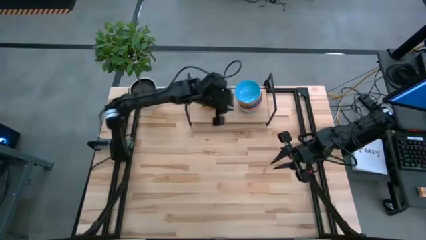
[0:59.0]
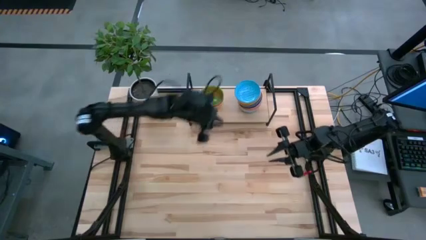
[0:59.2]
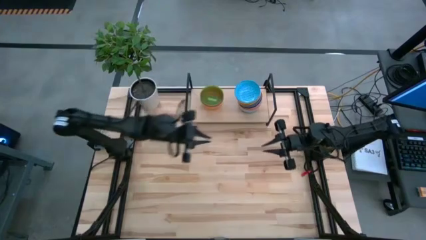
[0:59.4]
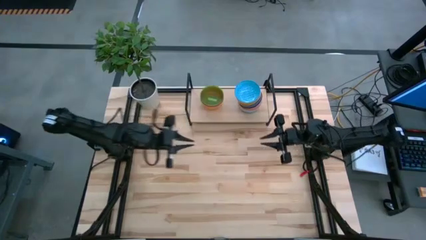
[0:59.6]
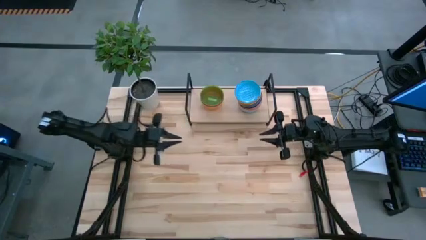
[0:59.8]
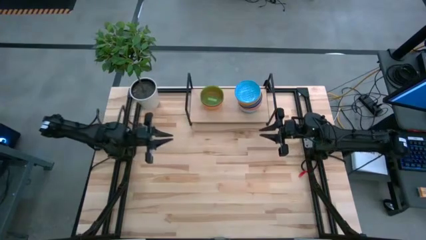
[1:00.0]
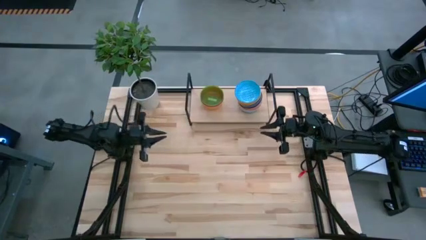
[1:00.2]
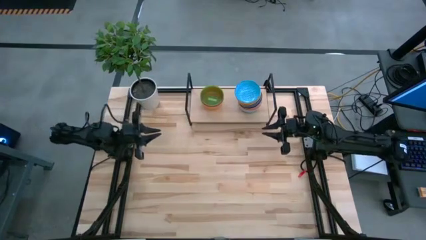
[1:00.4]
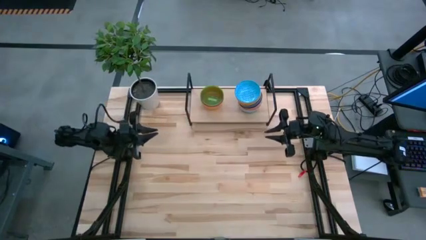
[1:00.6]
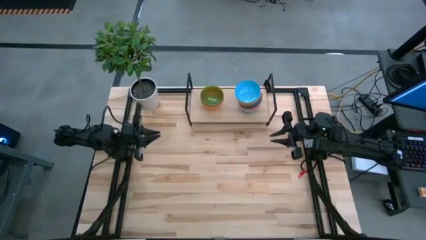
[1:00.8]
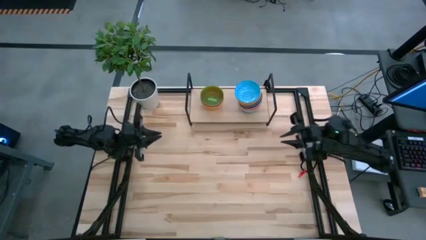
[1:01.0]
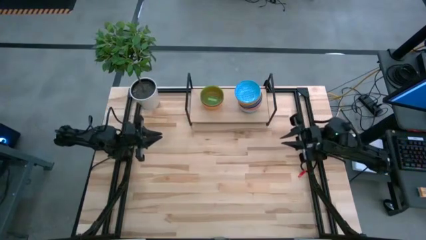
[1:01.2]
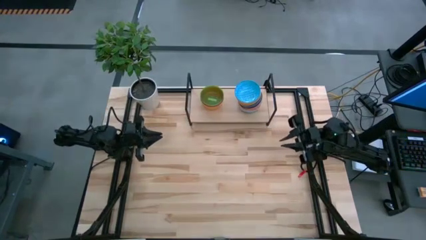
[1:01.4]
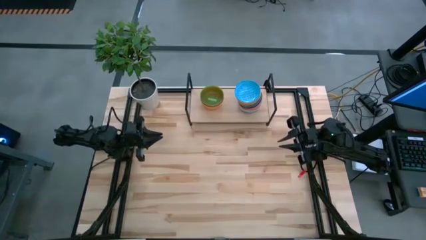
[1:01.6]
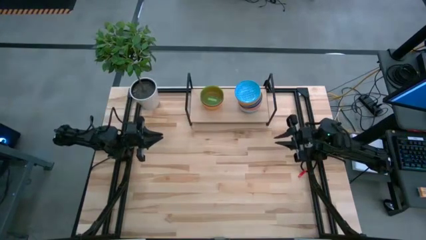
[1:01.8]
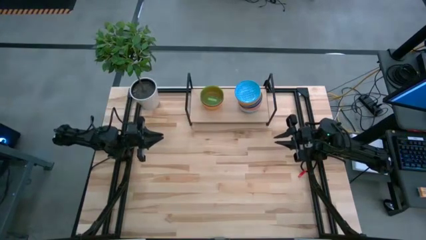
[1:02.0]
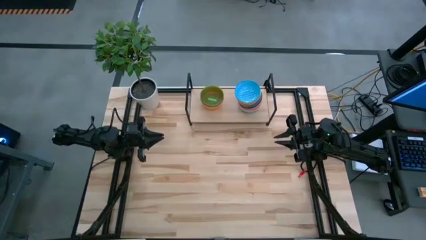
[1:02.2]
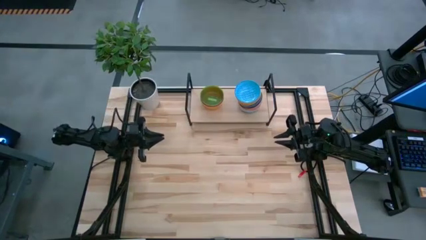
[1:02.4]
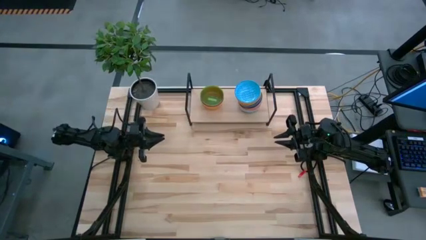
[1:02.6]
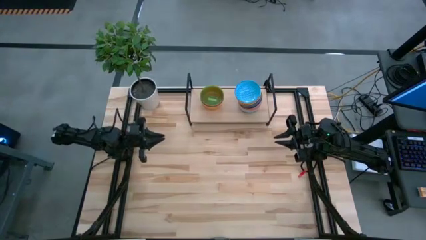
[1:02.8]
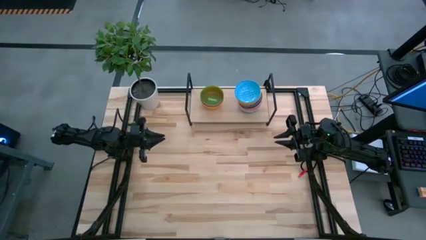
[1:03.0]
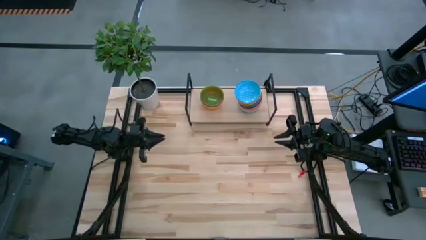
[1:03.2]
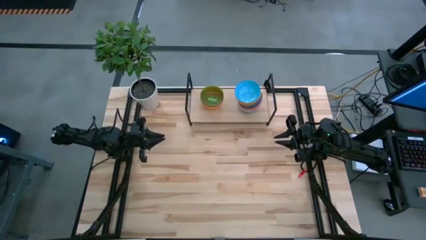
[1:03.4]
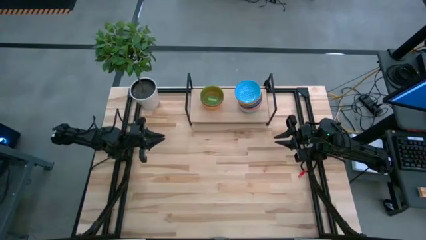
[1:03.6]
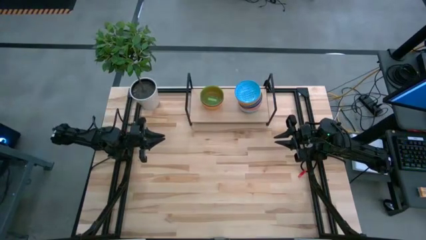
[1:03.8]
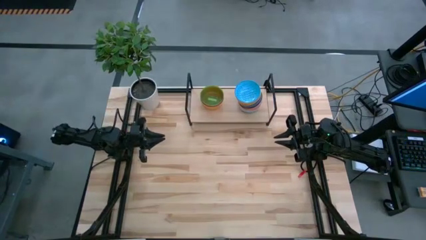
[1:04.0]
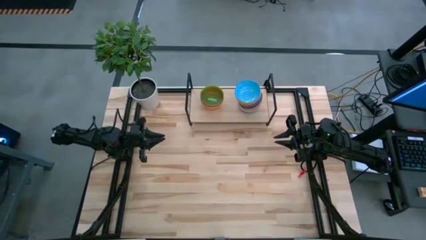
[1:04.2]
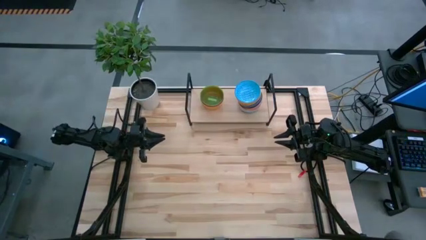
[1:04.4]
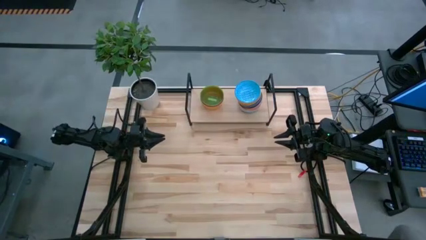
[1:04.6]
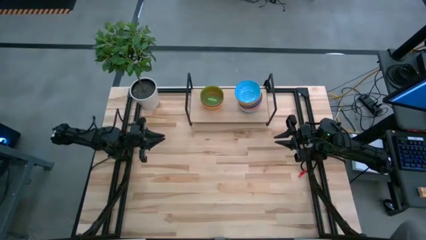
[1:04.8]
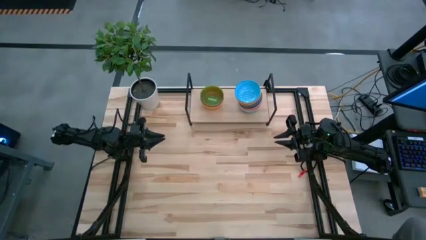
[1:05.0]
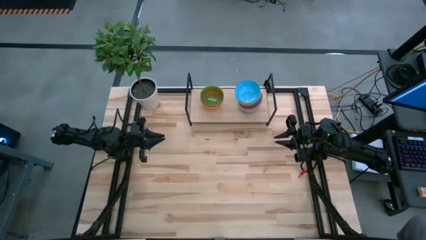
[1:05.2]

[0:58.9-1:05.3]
Task: Place and stack bowls onto a shelf
Return to Home Position

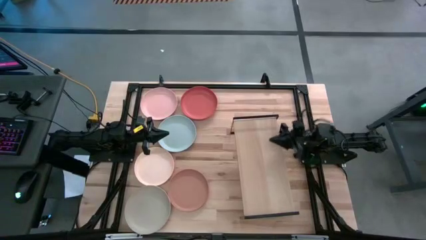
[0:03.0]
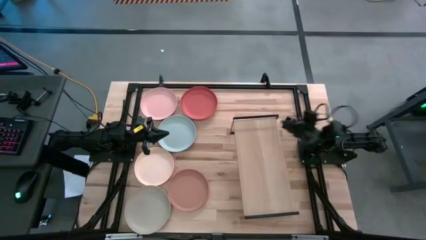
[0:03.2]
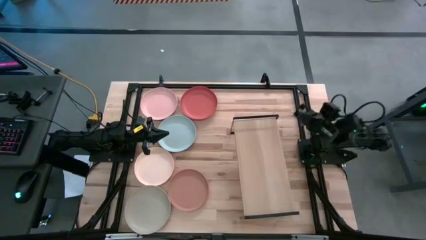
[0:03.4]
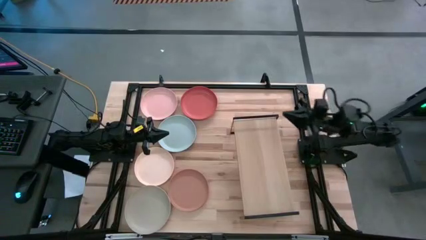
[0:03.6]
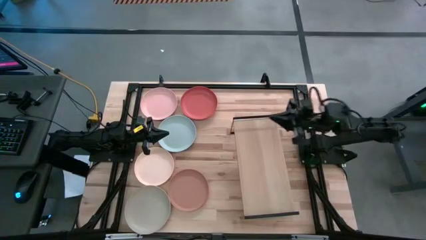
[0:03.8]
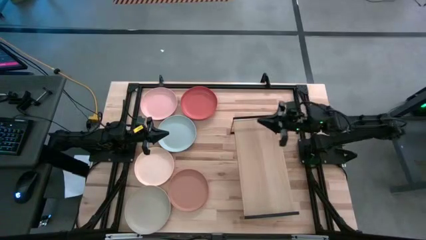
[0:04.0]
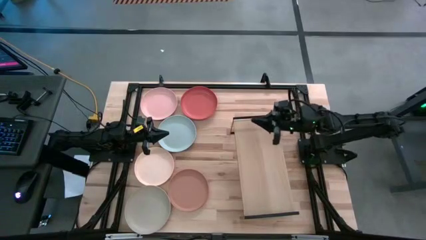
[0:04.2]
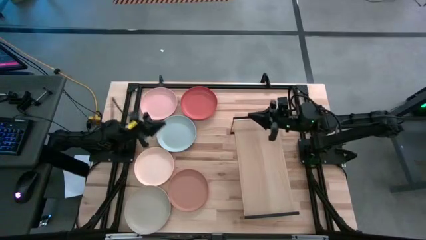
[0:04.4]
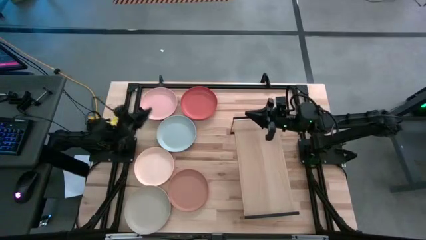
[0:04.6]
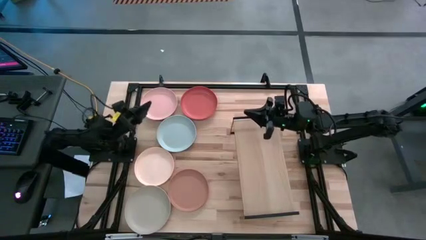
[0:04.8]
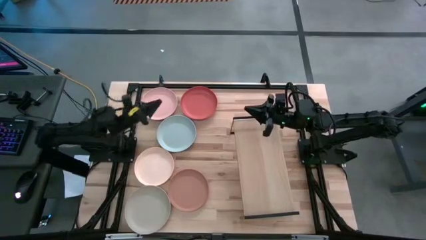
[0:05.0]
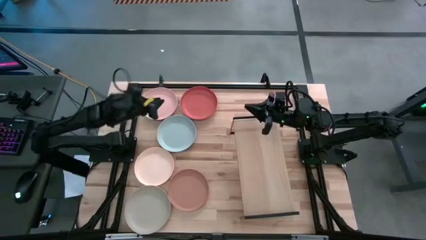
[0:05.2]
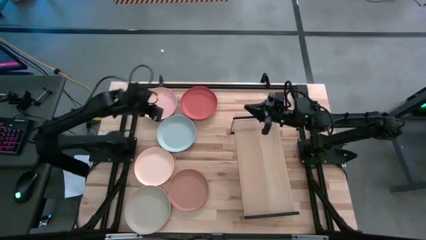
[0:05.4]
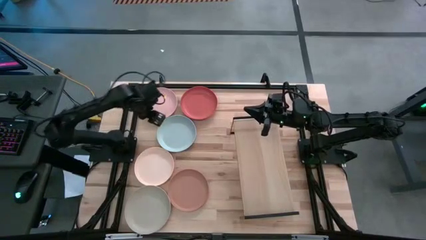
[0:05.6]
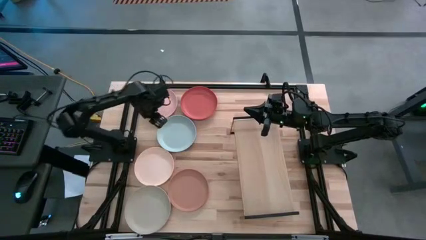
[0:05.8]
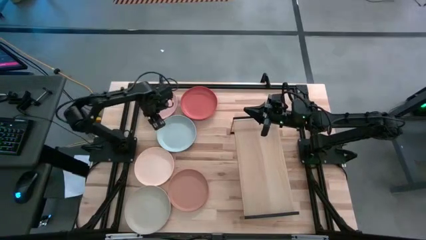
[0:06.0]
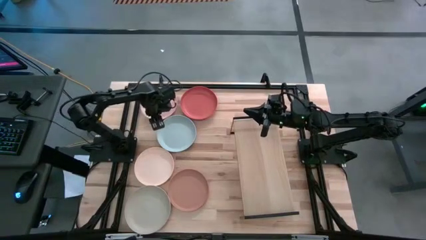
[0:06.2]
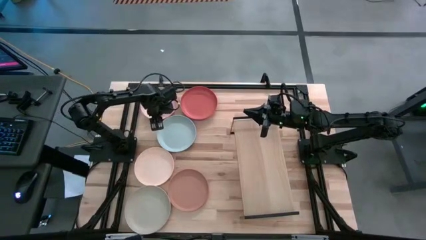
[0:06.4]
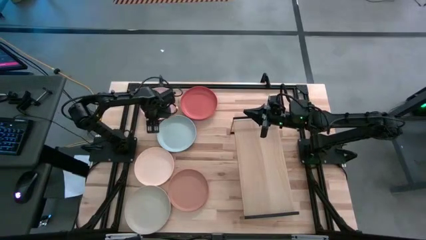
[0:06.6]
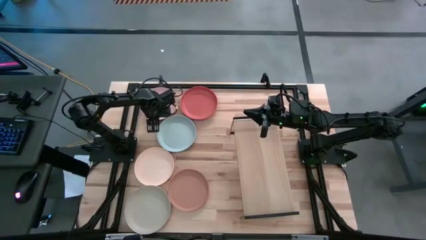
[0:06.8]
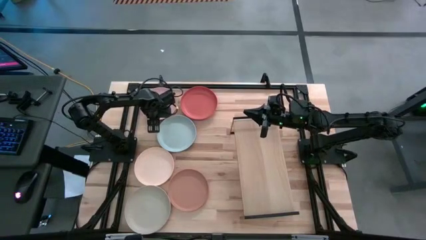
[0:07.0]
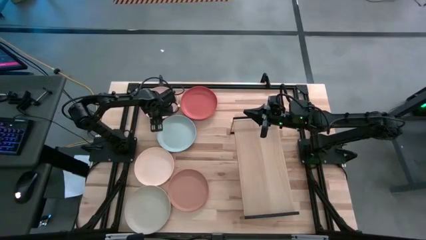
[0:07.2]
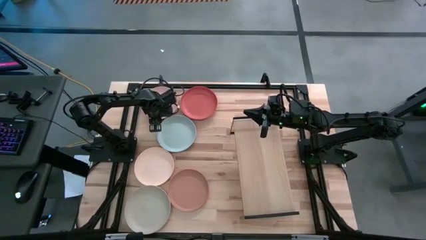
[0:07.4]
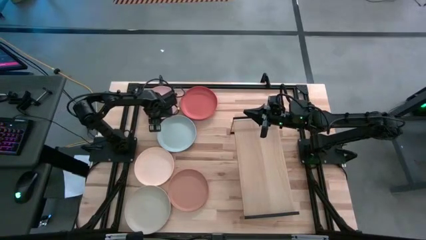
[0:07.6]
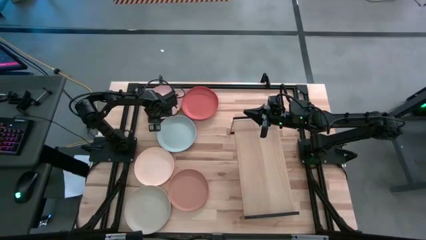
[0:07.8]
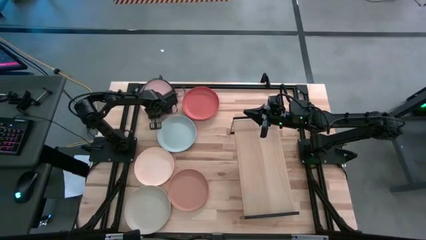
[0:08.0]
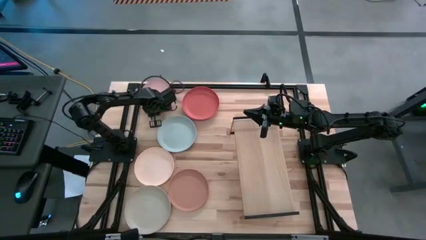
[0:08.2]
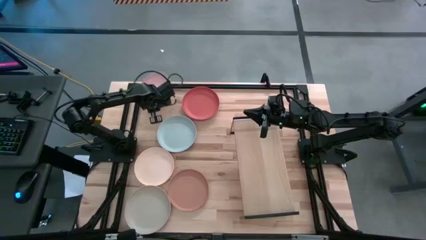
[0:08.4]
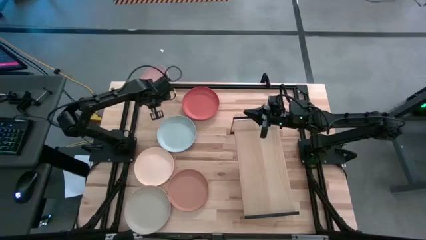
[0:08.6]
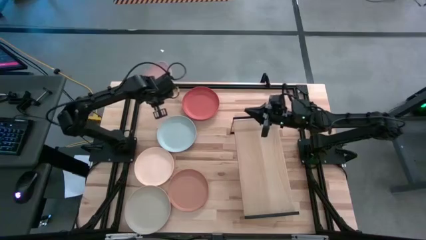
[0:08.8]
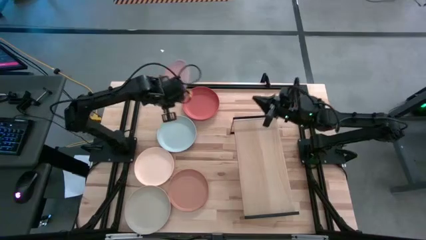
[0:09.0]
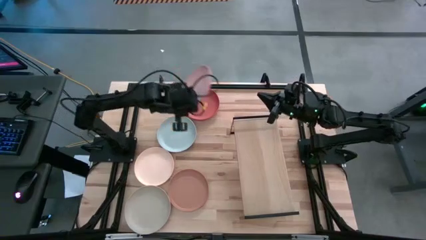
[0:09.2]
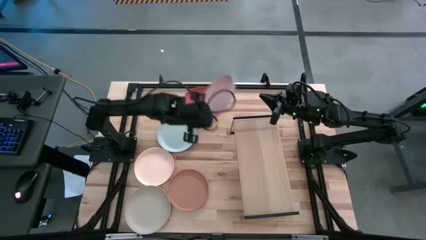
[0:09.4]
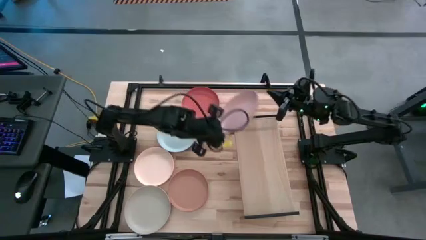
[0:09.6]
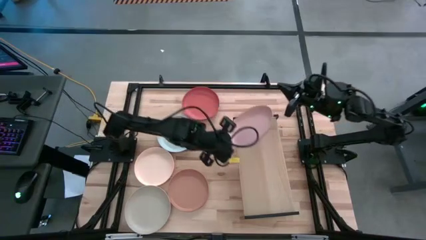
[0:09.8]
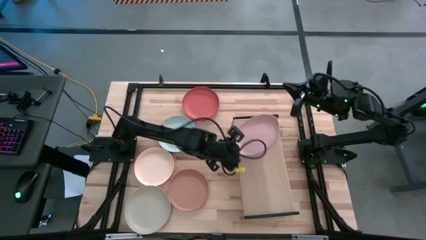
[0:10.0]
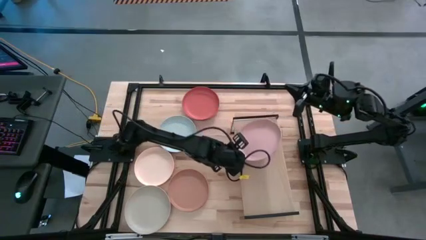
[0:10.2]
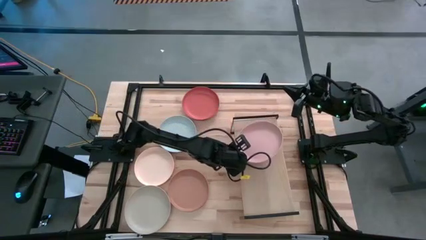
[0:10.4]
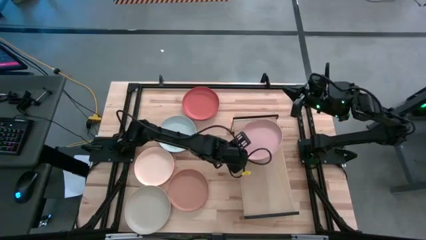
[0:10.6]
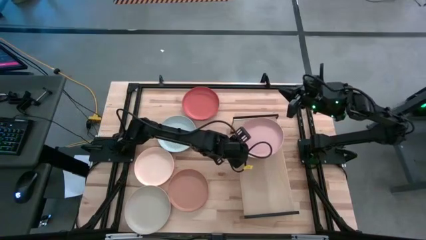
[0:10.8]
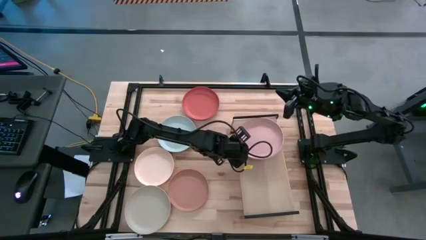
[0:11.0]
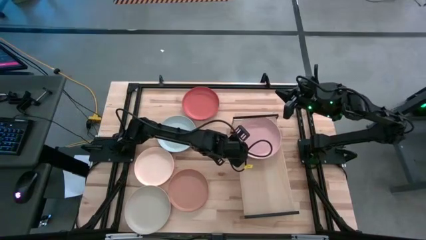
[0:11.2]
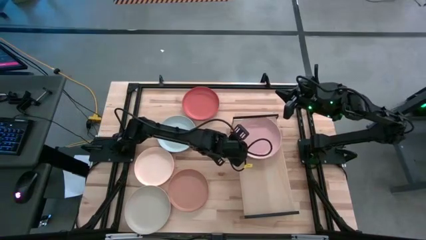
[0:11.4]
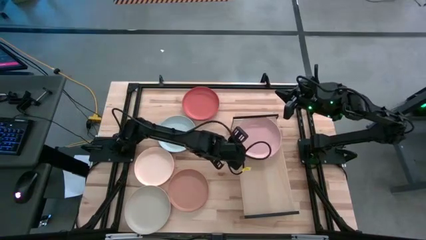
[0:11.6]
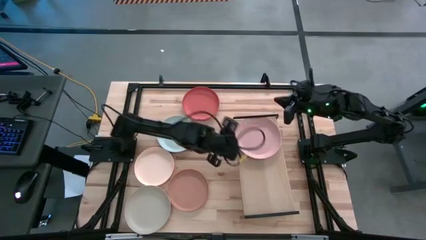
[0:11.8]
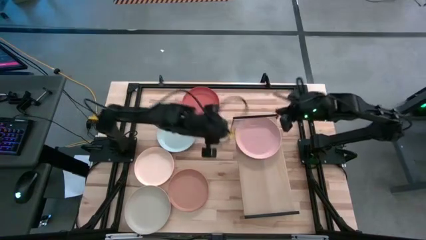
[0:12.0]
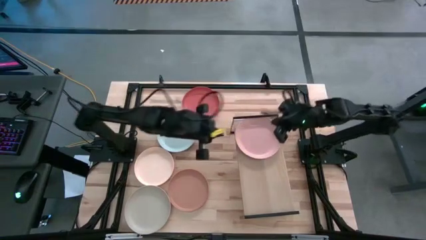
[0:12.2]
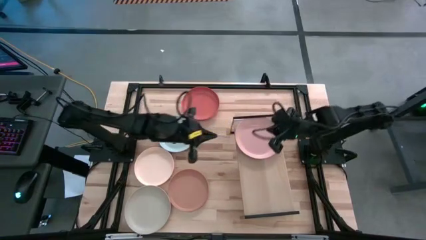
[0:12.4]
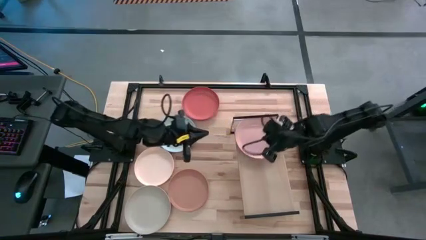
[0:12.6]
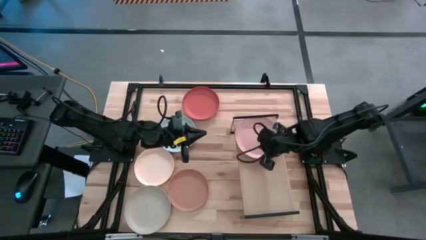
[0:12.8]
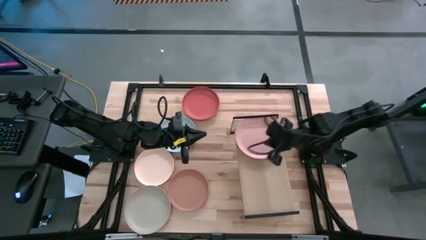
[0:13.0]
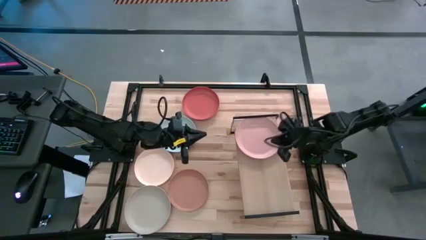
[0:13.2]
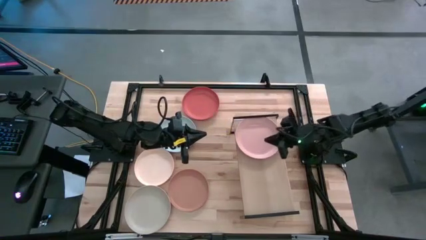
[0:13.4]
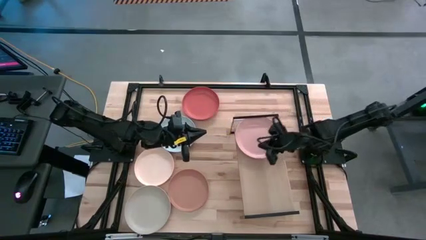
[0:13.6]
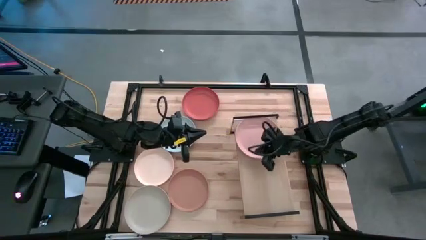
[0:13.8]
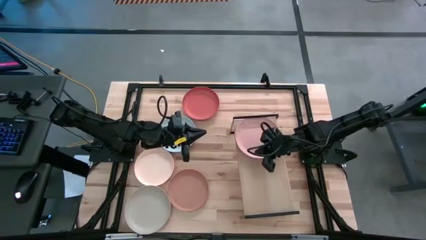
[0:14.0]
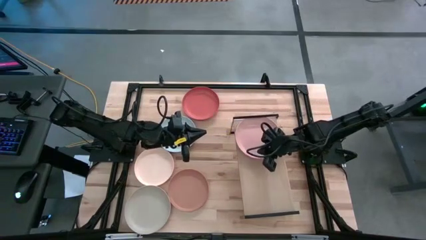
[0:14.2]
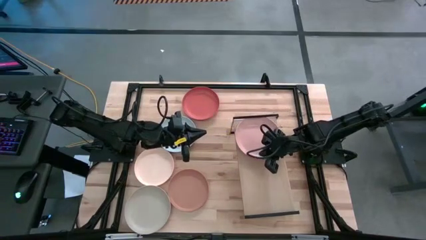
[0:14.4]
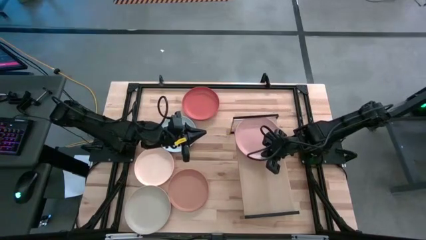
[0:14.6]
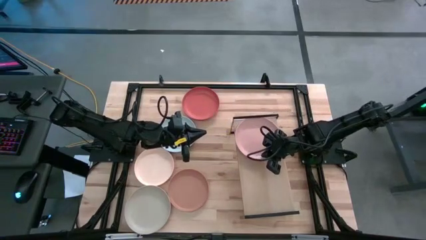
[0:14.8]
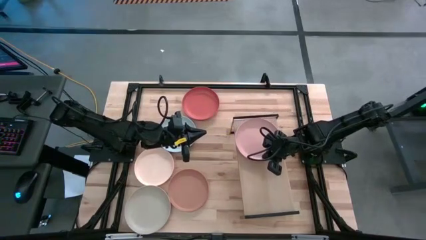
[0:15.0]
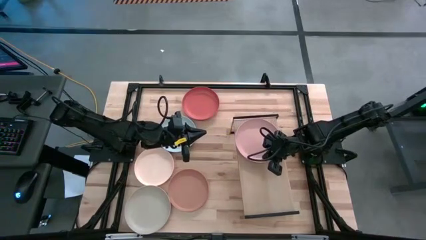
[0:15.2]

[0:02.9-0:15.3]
Task: Place and stack plates onto a shelf
Put the pink plate on the shelf
